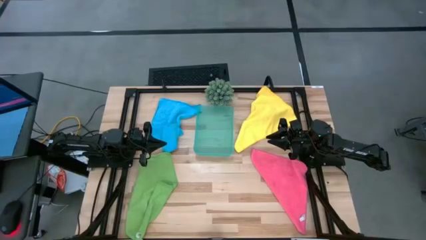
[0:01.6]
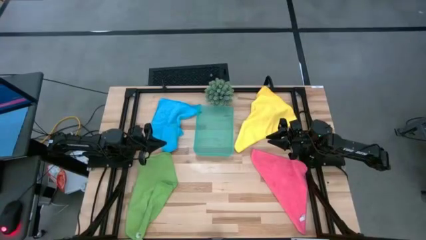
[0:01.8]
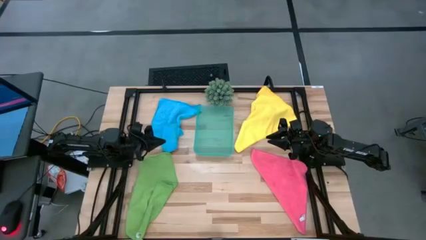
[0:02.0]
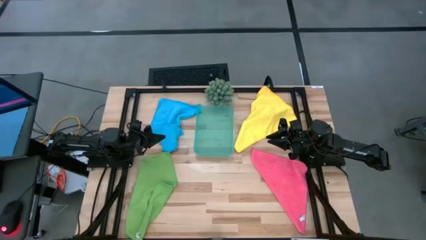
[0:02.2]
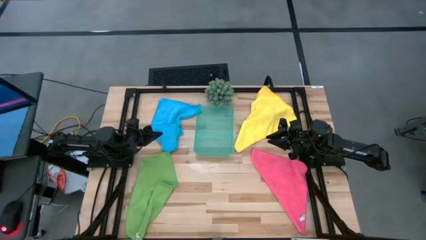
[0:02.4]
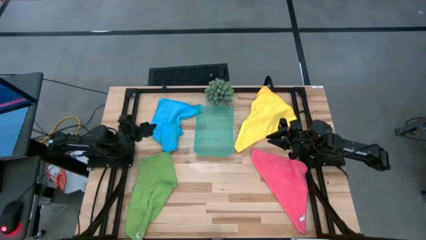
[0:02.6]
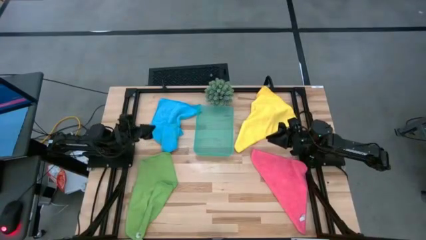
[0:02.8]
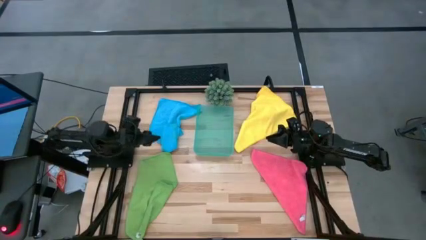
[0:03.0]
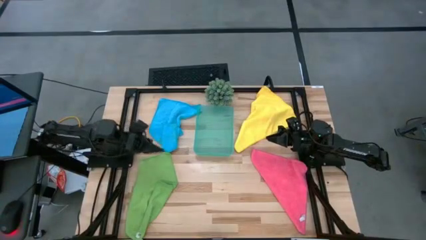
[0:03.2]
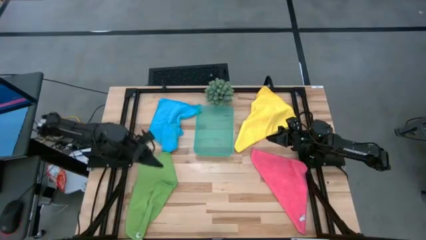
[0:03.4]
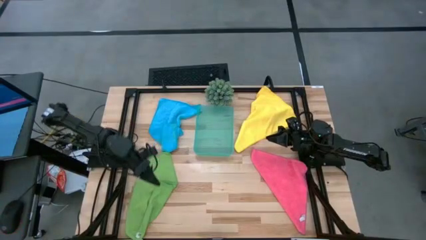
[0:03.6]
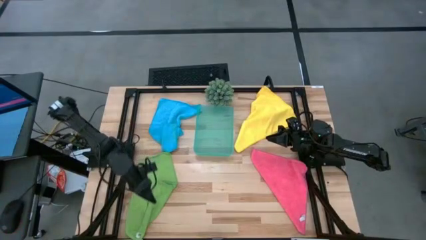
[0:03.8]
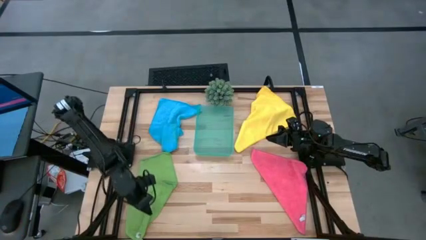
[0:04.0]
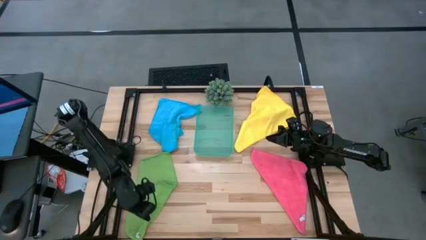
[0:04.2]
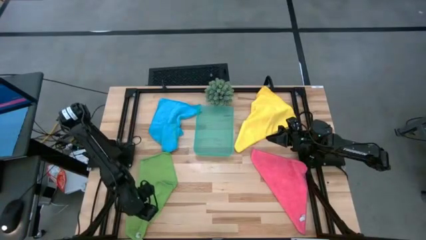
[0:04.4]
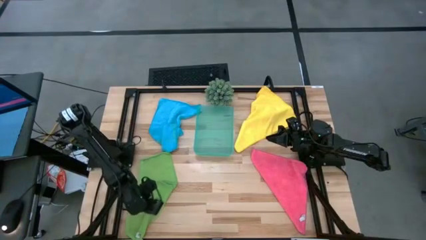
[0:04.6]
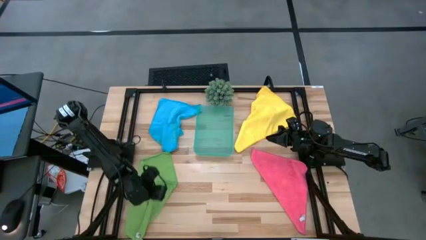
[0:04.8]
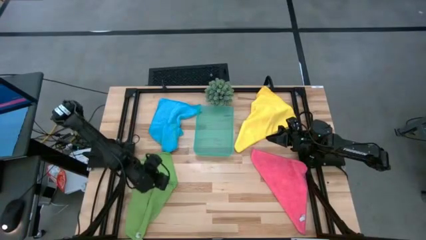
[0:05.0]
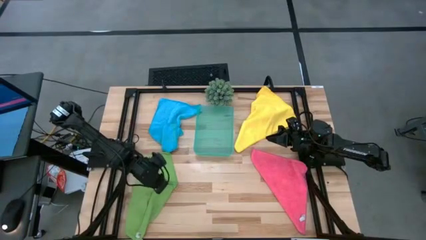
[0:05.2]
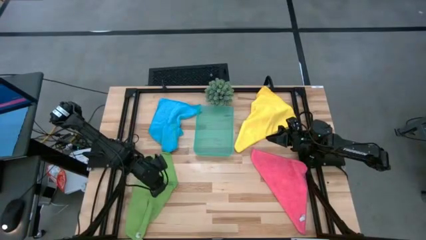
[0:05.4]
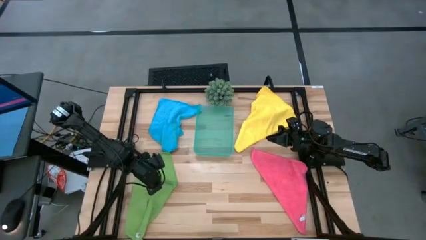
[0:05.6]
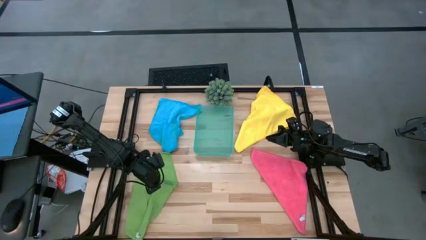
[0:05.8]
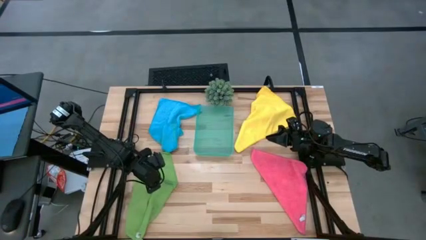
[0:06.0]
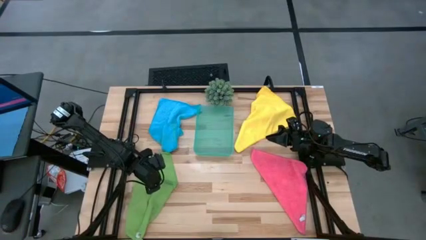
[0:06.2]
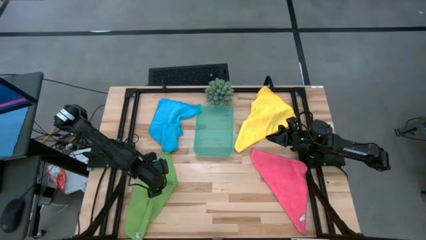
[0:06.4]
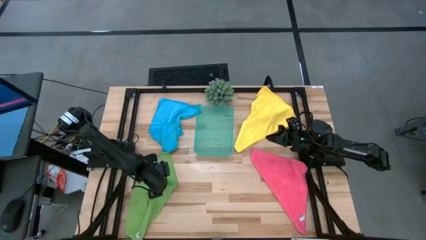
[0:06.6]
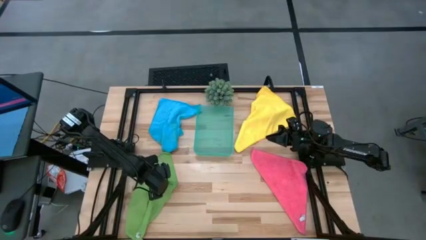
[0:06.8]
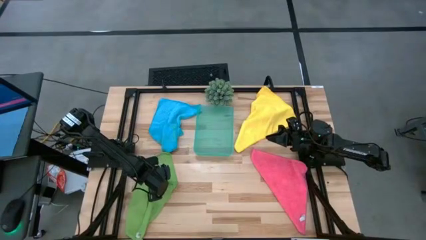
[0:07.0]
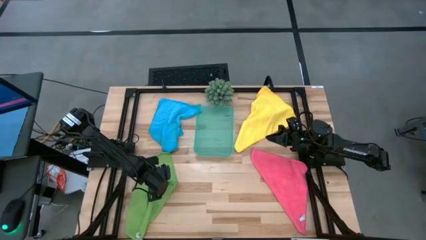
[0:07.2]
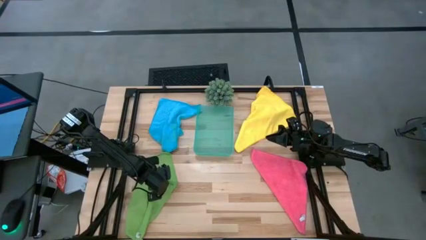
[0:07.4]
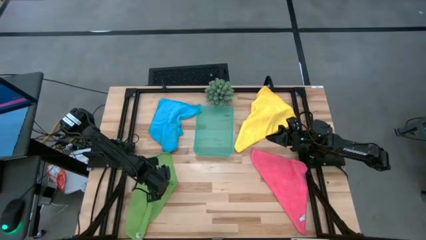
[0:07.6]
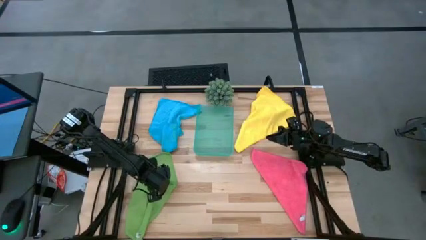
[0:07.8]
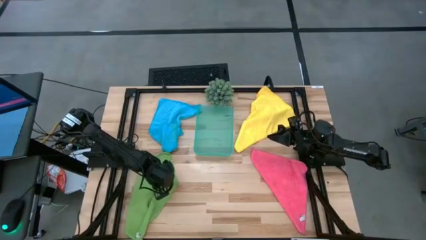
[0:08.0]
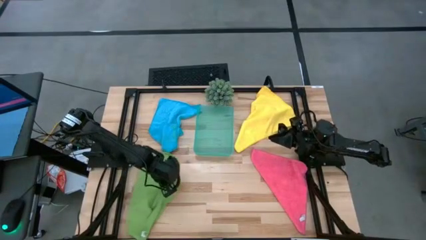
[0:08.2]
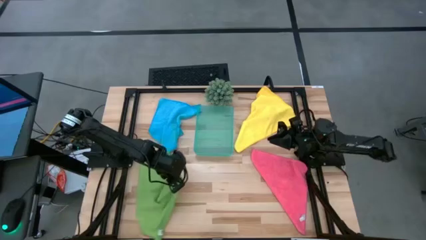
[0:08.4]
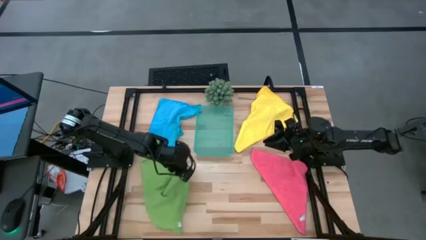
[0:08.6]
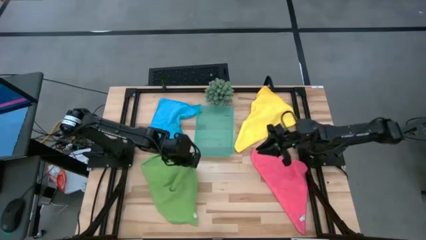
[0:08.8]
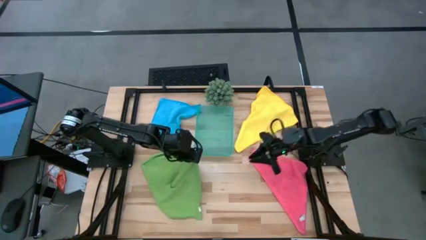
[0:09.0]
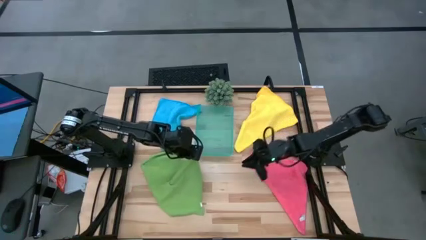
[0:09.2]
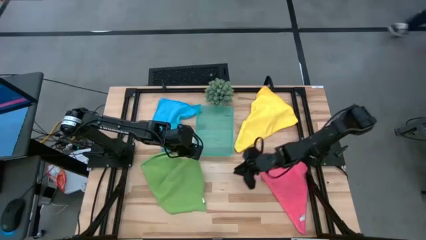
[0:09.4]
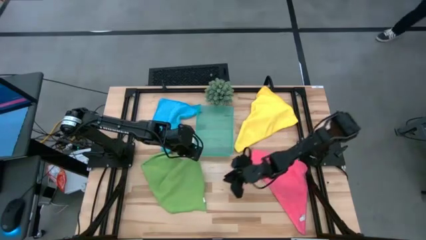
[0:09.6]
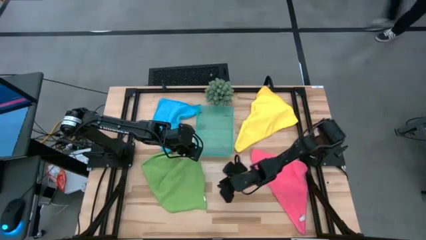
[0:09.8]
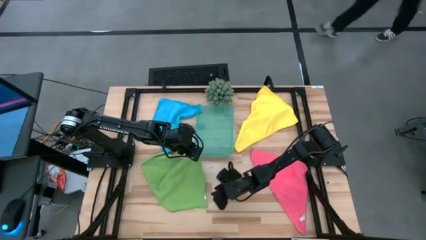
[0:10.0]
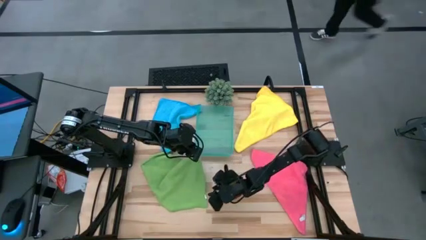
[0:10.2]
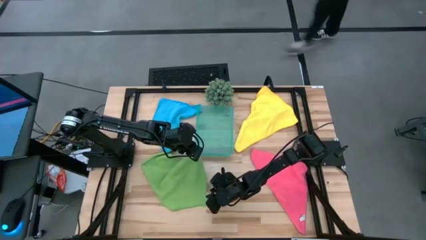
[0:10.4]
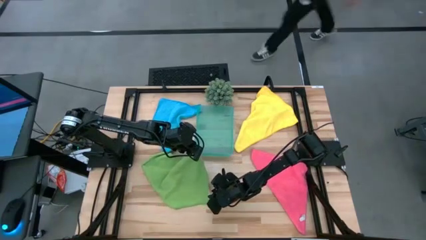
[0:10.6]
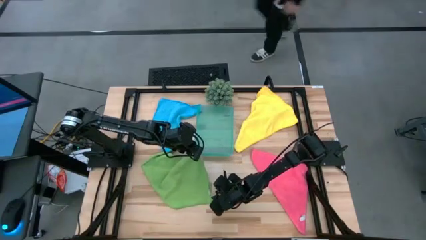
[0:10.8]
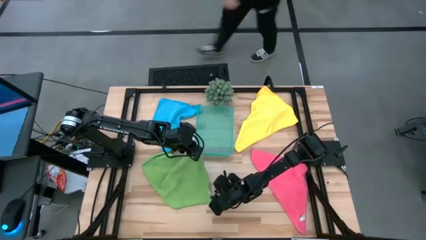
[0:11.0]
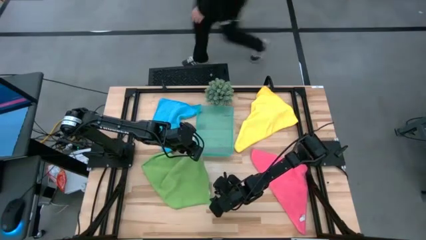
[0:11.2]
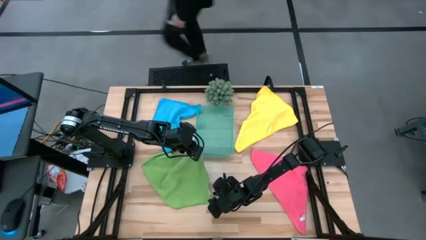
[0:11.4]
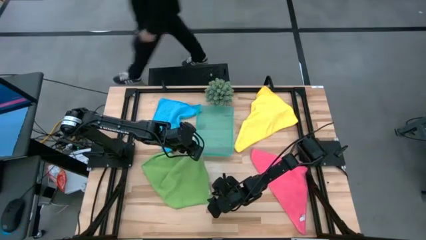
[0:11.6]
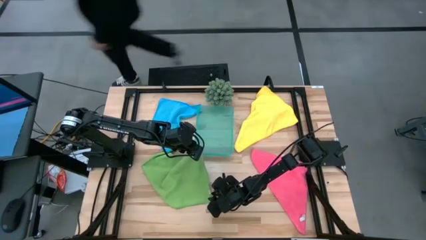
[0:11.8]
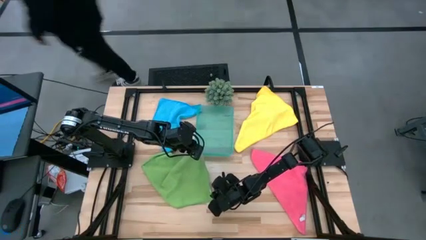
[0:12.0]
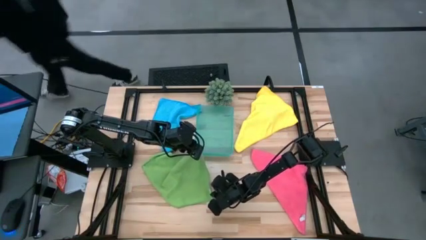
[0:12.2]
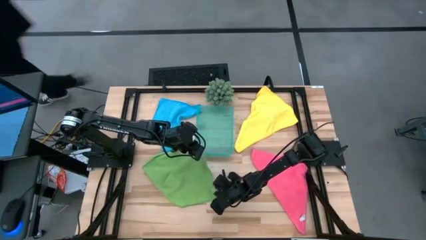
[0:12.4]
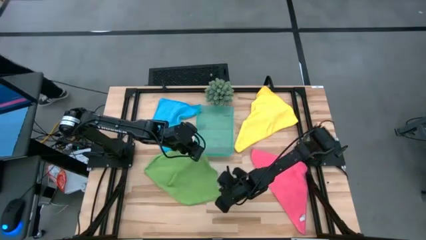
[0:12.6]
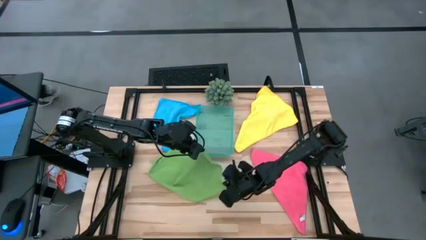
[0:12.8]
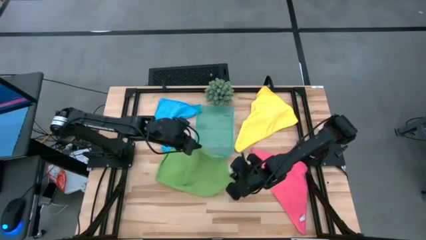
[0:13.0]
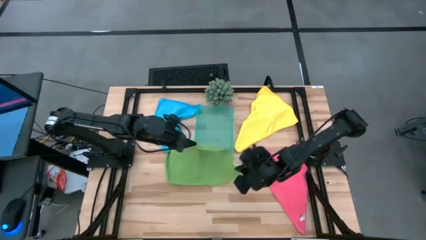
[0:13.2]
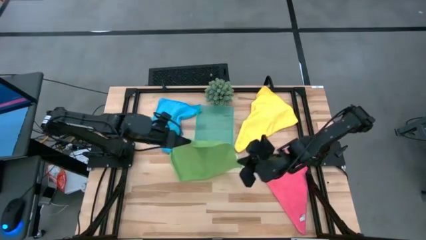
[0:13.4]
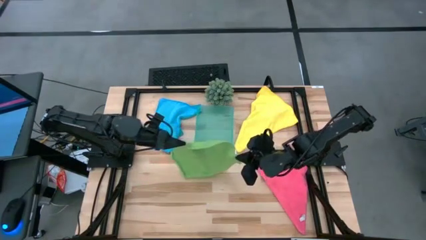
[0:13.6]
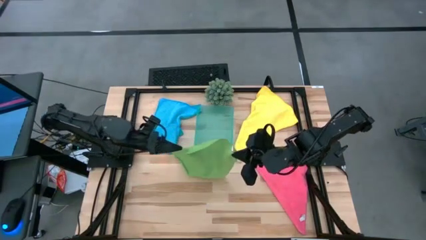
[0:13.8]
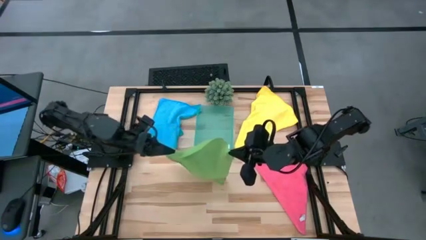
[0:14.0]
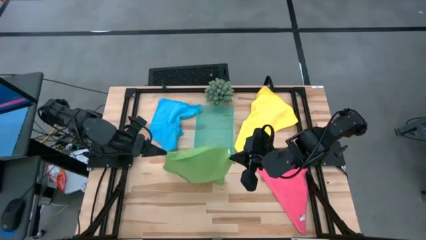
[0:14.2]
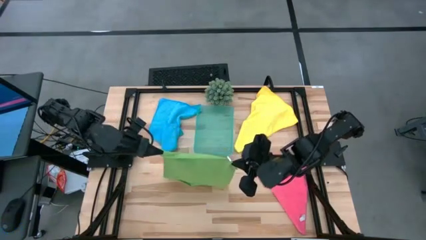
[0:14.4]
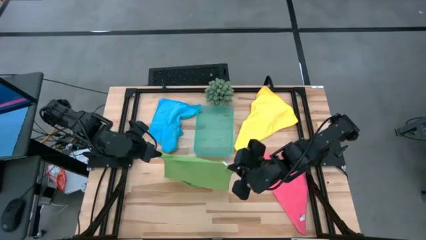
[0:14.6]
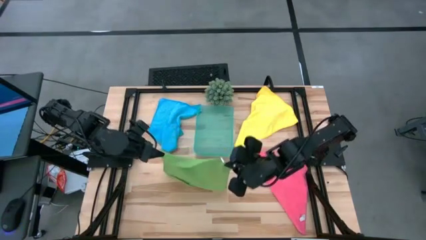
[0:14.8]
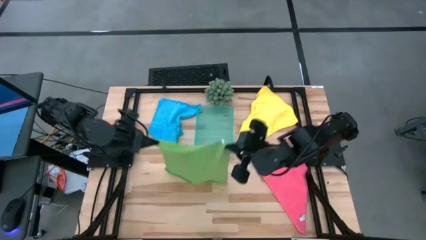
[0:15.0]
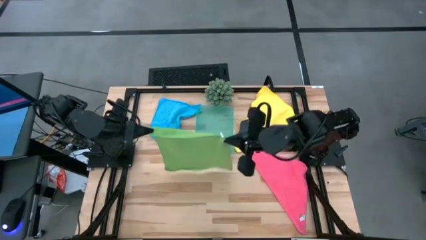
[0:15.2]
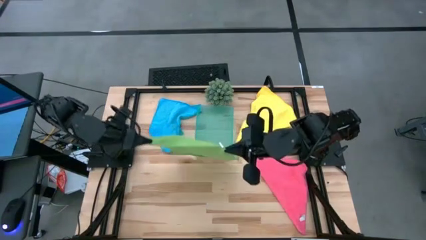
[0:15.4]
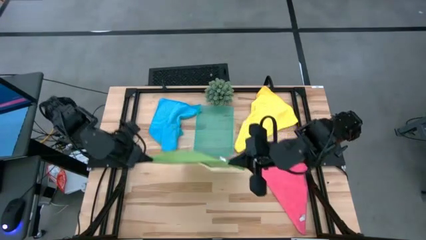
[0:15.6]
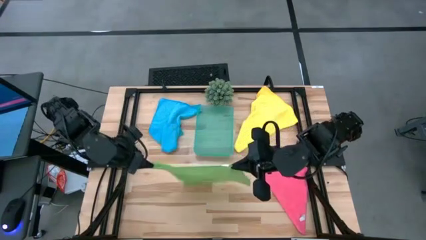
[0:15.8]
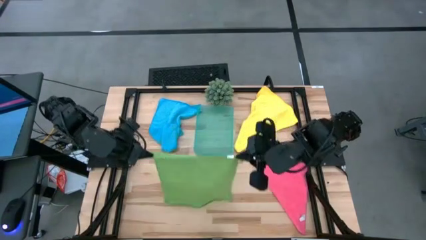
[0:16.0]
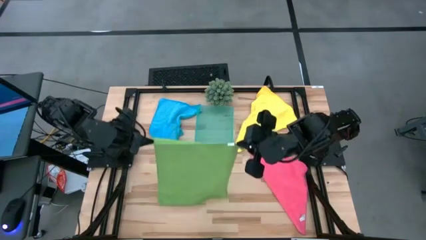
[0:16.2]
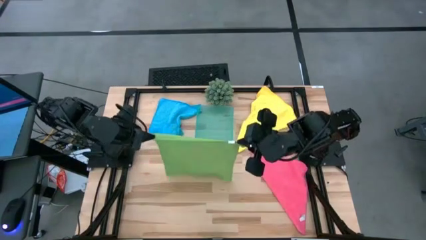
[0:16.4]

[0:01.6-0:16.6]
Task: Fold microfiber towels
Fold the green micro fiber cloth
